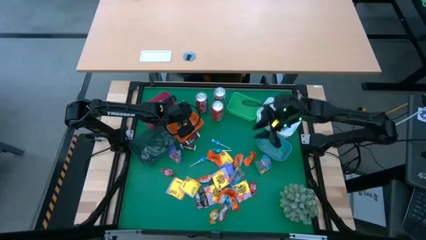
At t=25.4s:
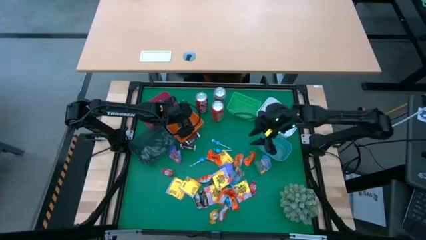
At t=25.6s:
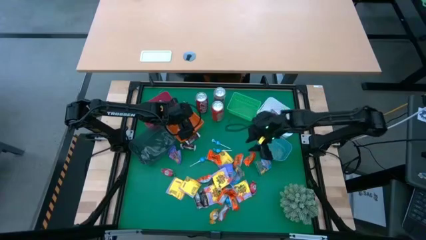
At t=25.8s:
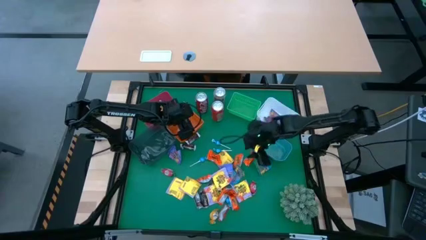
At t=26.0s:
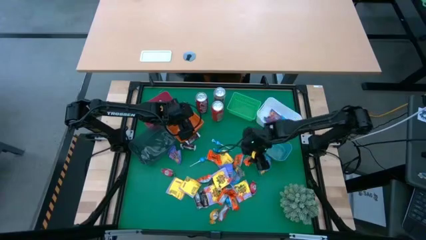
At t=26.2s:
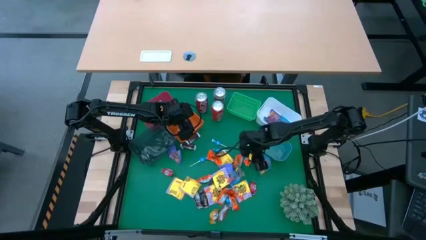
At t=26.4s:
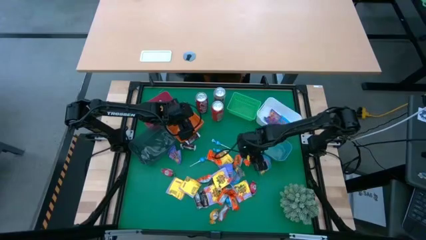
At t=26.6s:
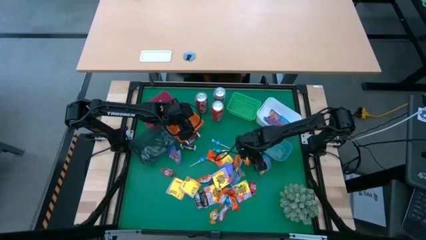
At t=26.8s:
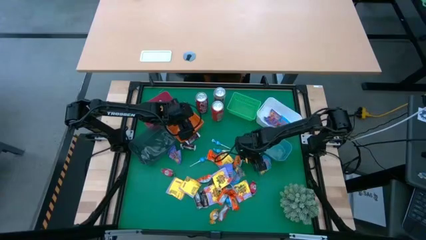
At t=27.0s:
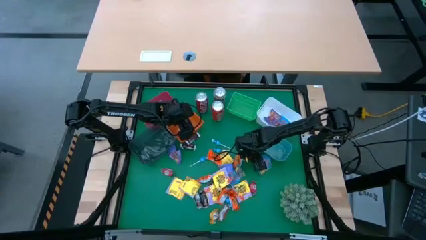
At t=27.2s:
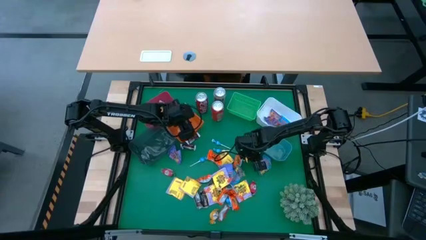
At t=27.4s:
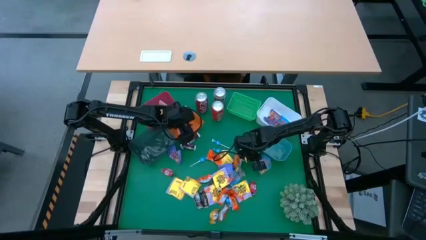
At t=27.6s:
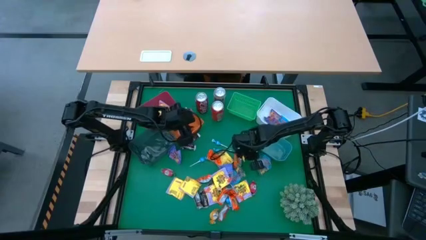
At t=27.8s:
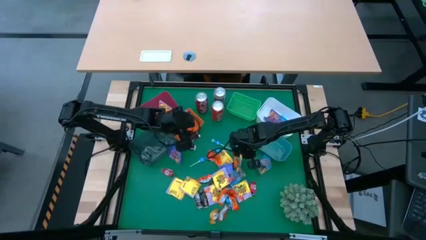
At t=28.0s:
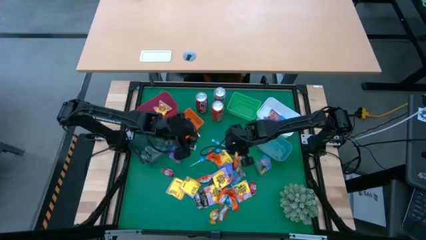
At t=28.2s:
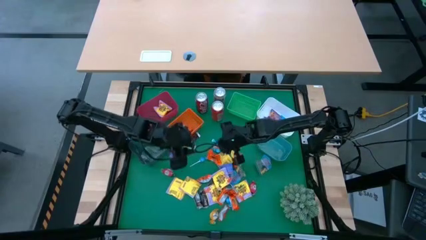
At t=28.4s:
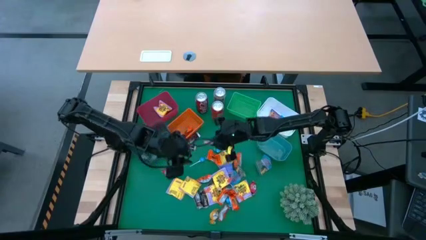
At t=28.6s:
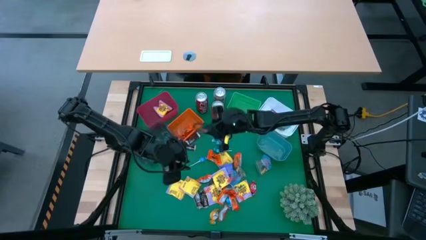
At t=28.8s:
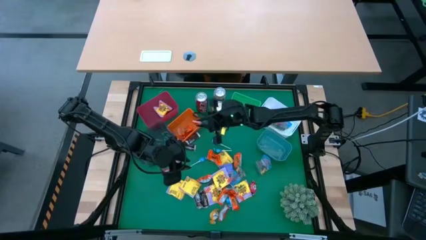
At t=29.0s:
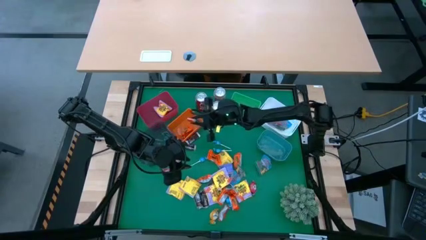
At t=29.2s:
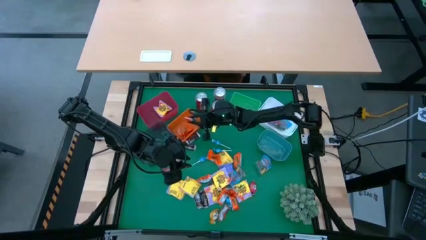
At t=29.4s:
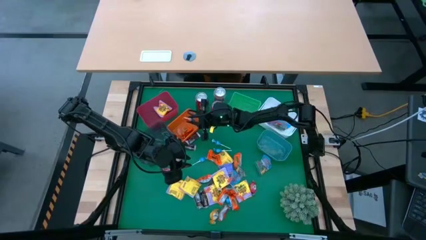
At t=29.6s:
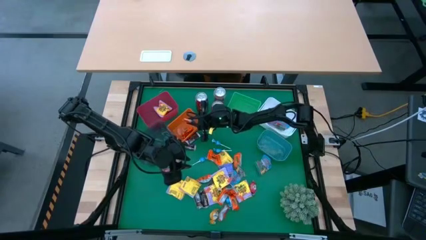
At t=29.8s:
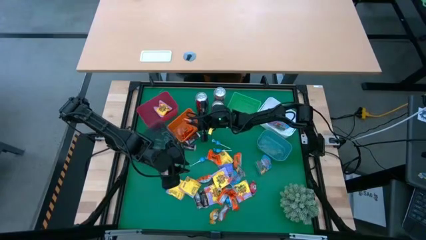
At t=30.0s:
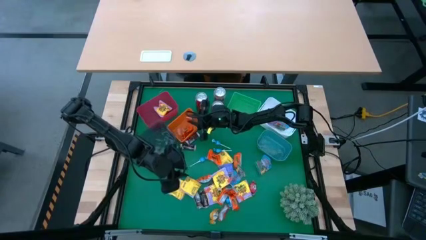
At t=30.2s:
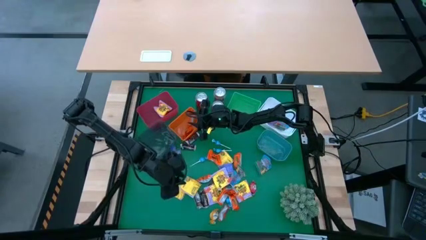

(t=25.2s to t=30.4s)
Task: Sort candy
Put the orange candy into the orange bin

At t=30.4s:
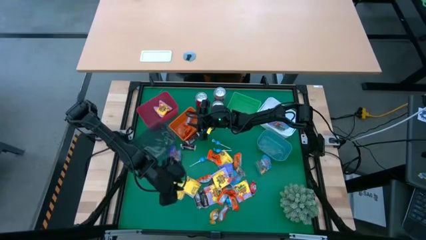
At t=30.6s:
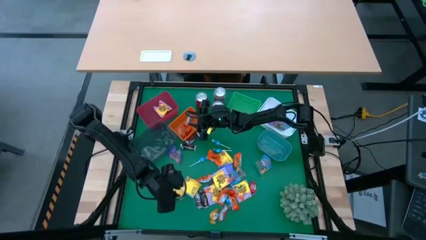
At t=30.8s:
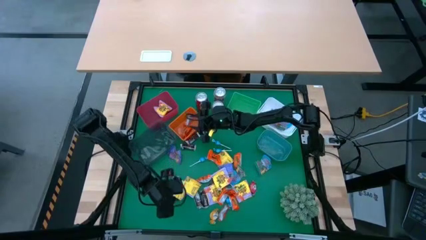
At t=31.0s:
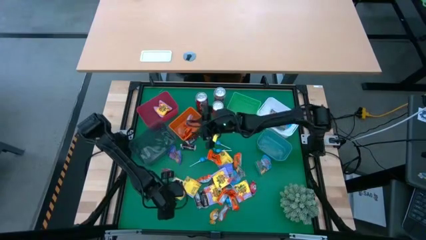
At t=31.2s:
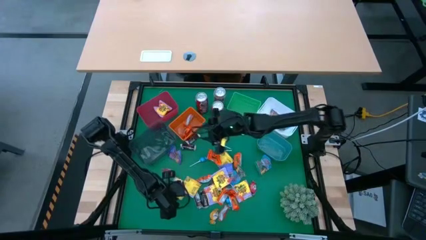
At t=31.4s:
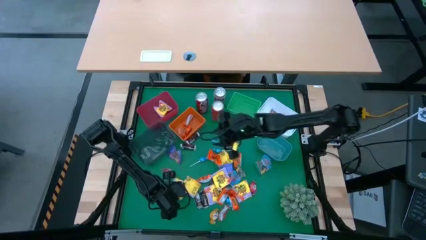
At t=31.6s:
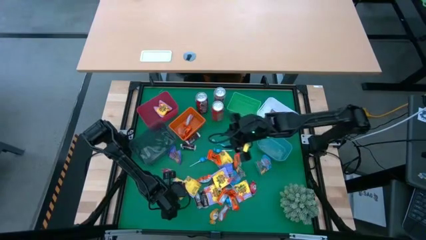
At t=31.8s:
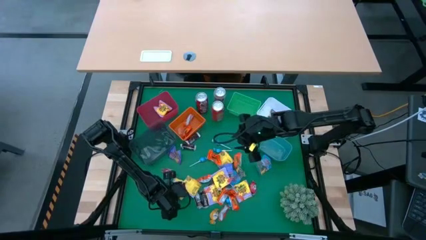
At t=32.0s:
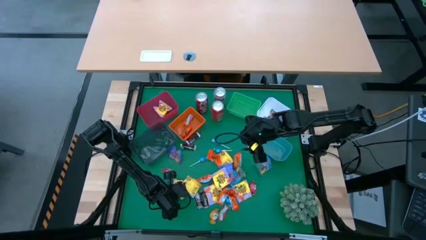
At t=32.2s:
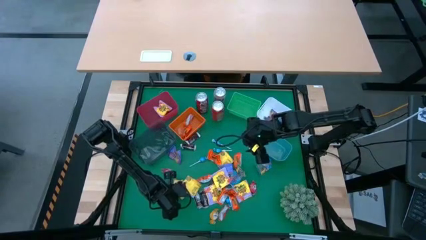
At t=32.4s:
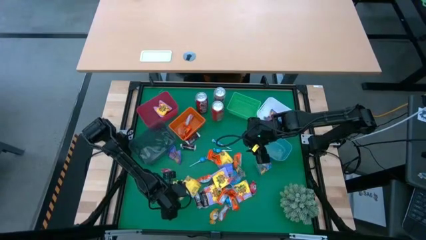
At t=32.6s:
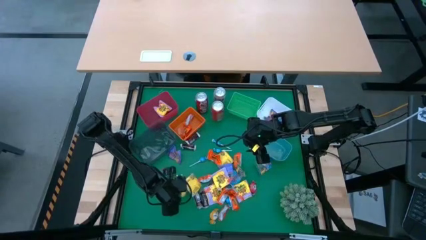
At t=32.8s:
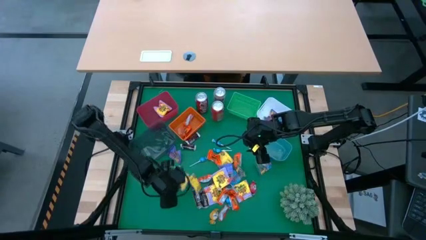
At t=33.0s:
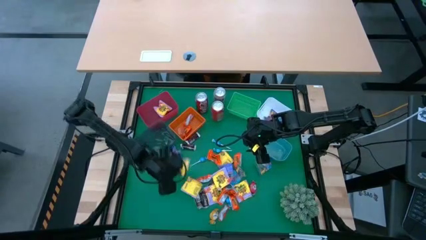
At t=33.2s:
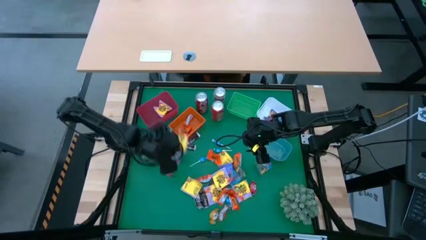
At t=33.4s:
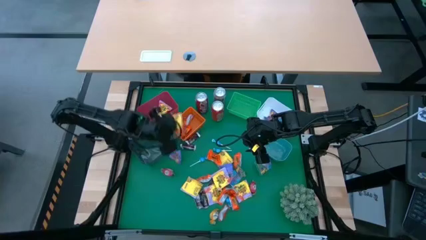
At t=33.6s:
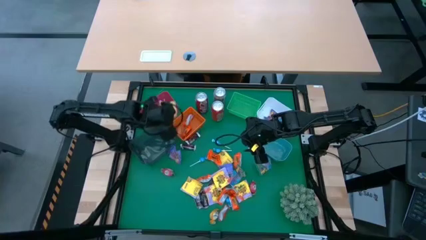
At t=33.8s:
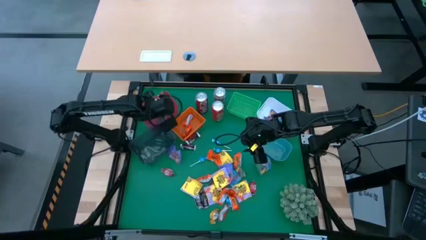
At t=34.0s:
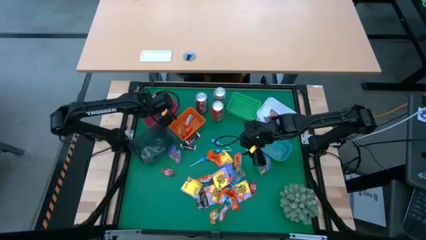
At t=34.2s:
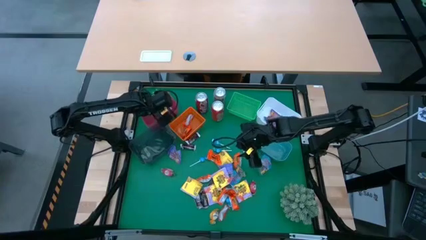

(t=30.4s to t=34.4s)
Put the yellow candy into the red bin

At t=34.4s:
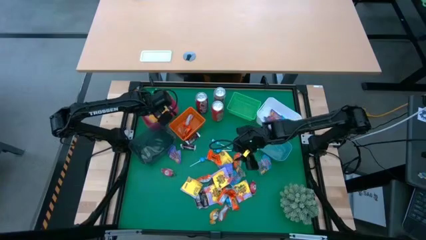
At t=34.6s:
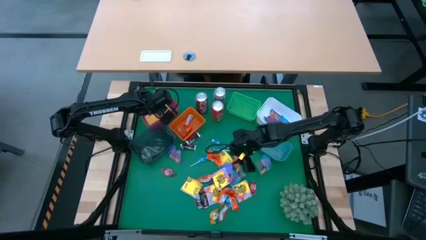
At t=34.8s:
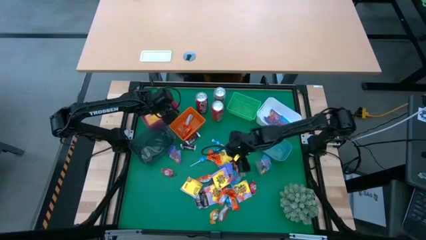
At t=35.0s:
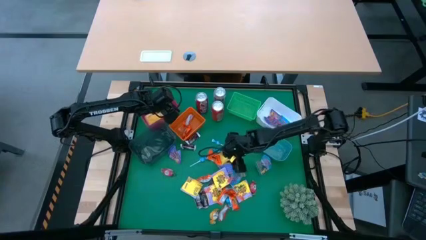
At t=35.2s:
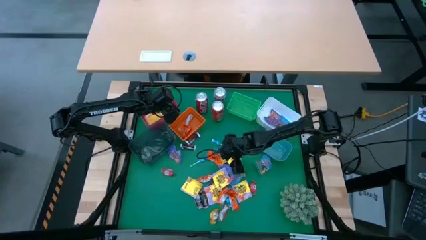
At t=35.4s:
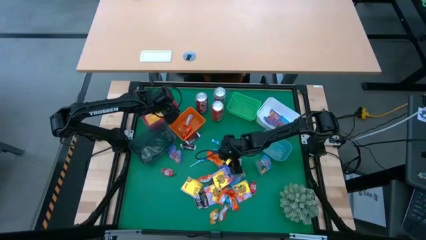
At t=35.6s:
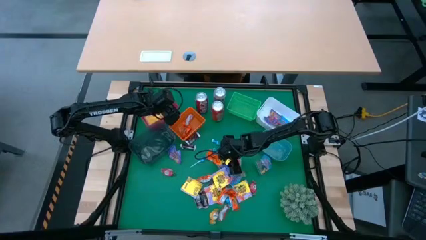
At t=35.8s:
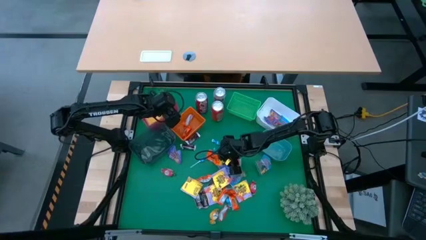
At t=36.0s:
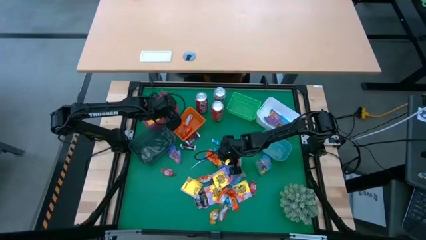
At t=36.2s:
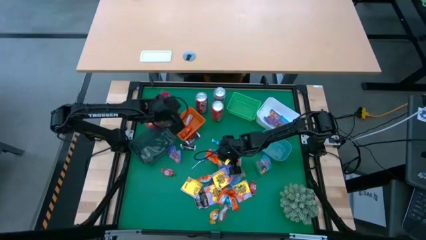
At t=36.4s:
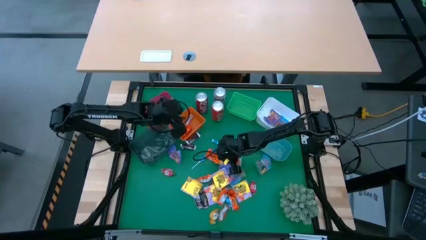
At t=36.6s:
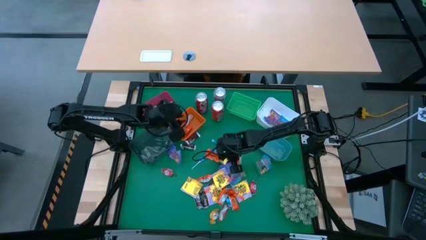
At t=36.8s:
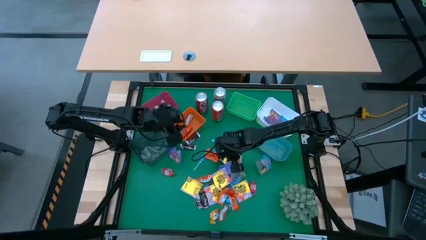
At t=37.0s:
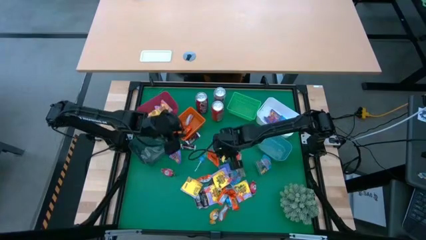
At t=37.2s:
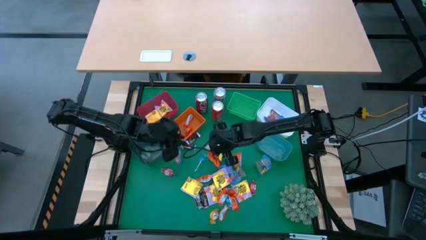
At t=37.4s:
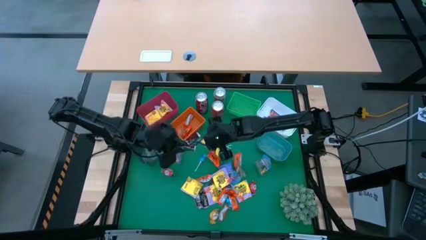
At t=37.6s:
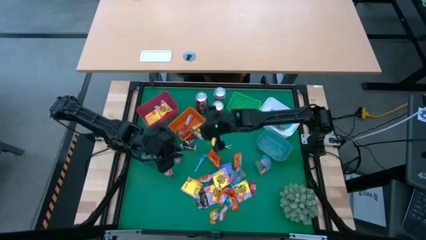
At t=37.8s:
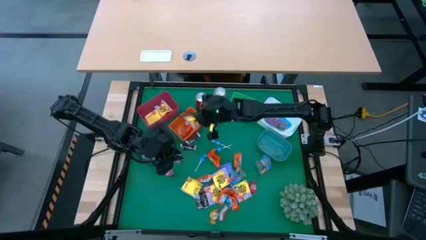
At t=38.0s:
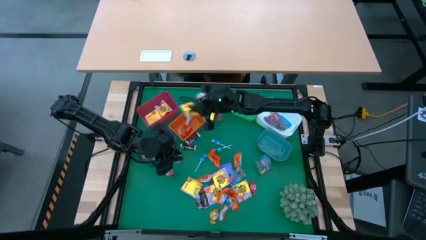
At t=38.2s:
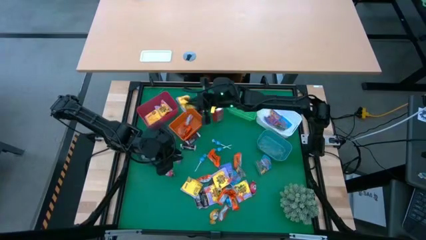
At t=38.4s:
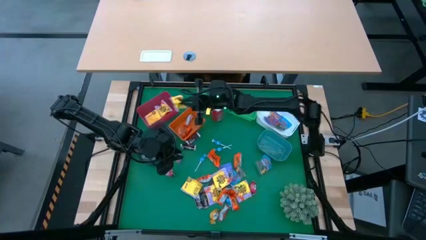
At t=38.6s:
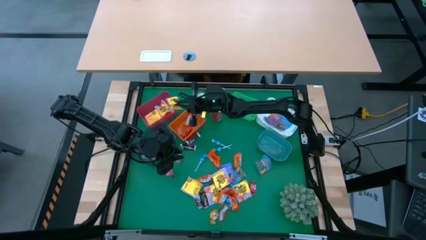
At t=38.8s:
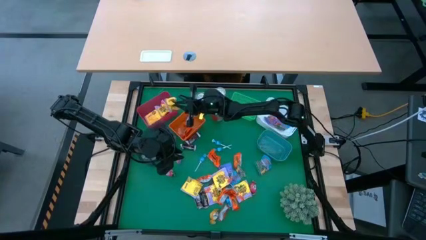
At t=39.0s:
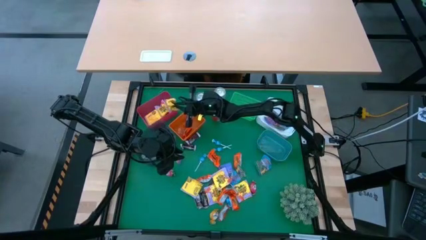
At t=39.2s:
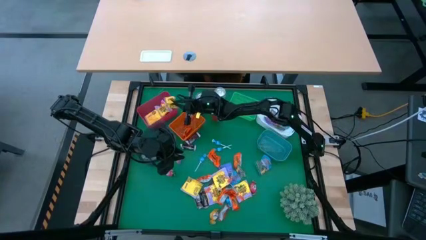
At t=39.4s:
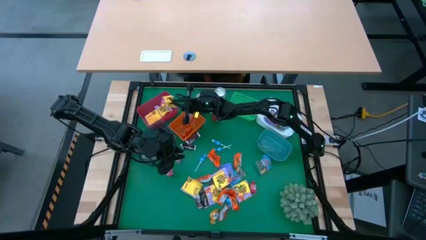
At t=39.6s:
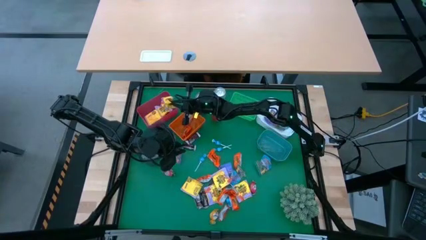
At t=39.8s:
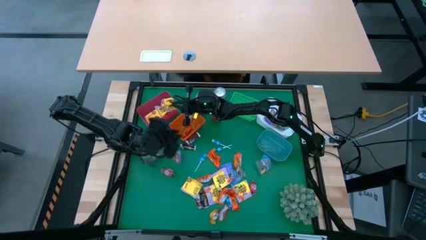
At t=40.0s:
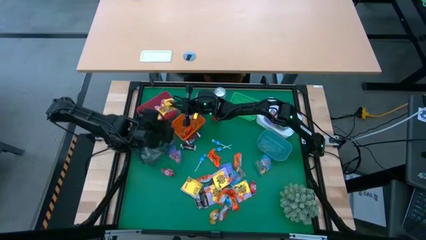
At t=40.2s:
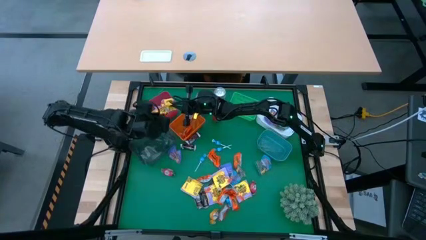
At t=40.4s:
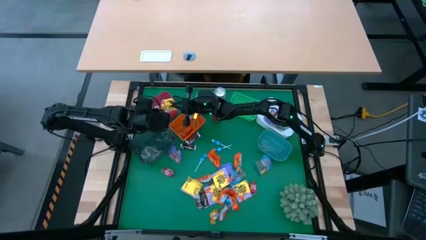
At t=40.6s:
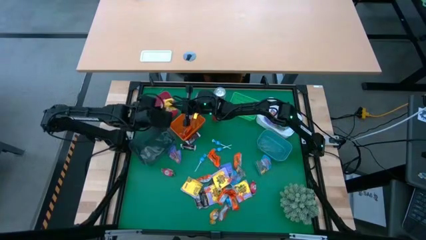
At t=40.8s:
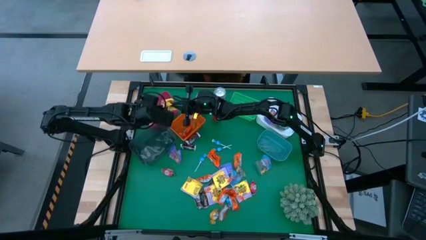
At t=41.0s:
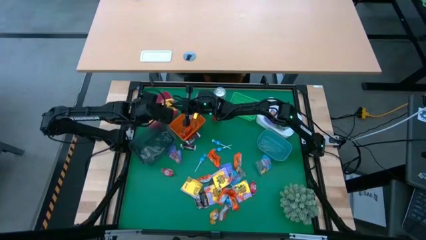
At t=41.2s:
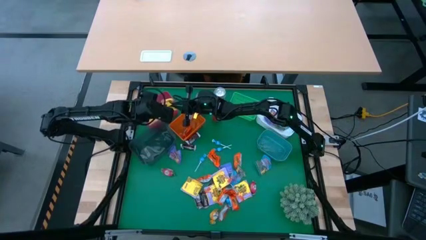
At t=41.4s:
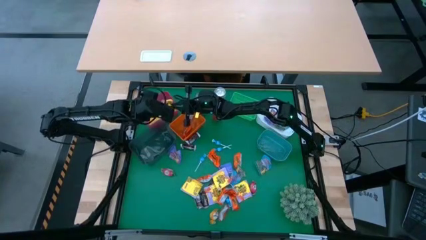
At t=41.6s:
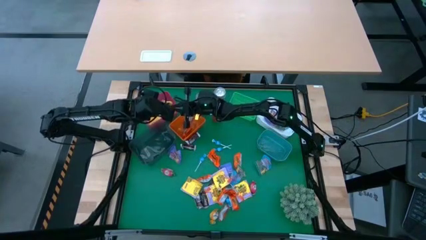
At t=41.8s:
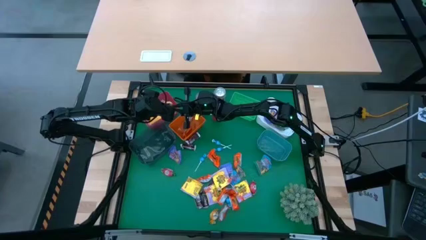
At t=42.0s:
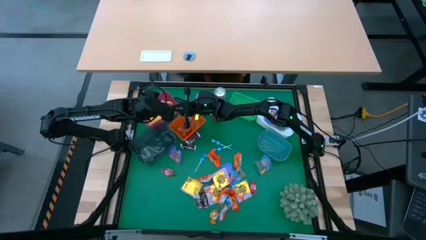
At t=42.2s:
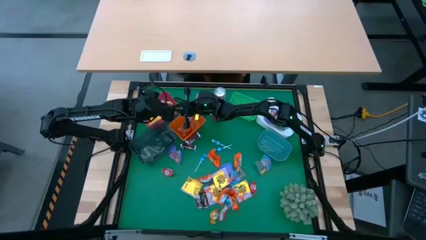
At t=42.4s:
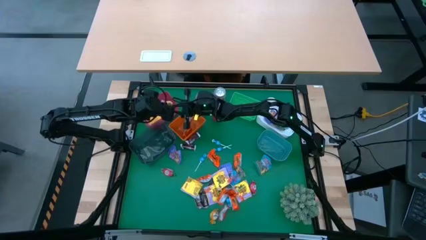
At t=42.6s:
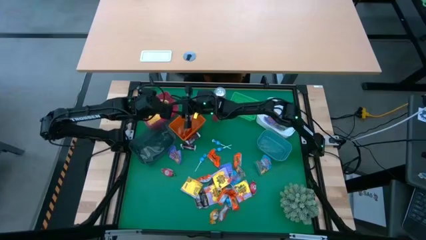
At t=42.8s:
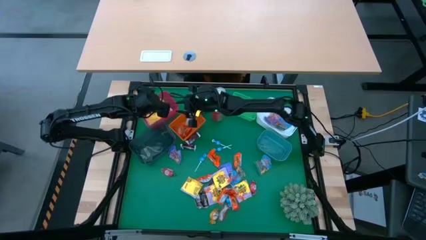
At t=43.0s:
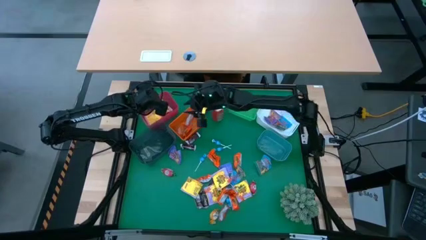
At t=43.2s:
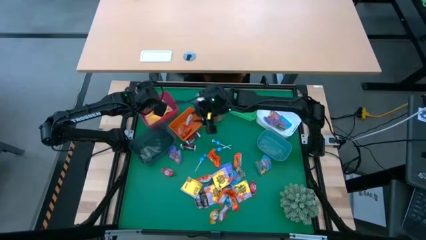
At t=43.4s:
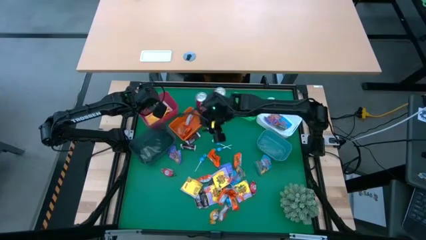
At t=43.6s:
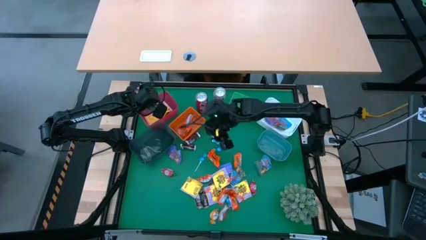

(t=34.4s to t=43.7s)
Put the yellow candy into the red bin
